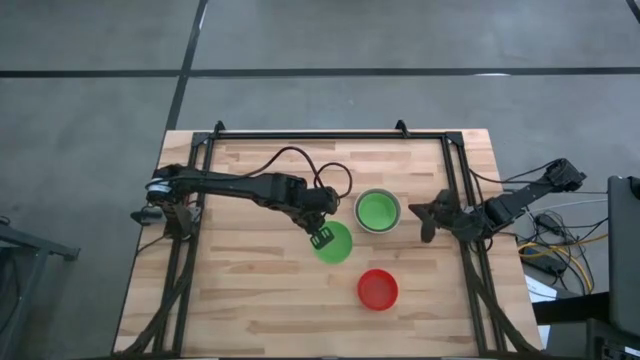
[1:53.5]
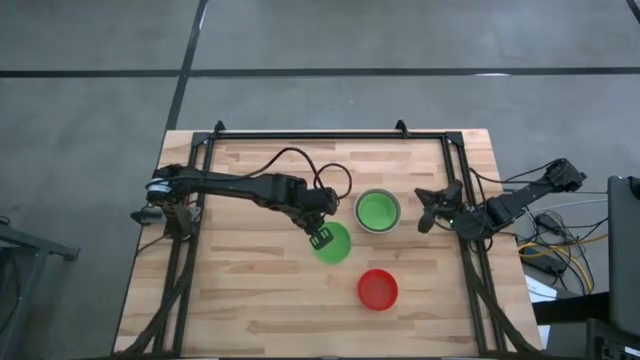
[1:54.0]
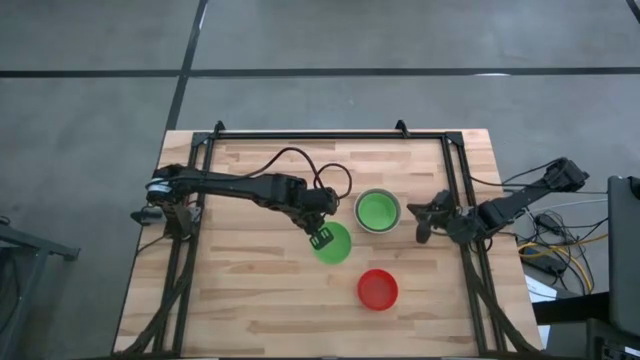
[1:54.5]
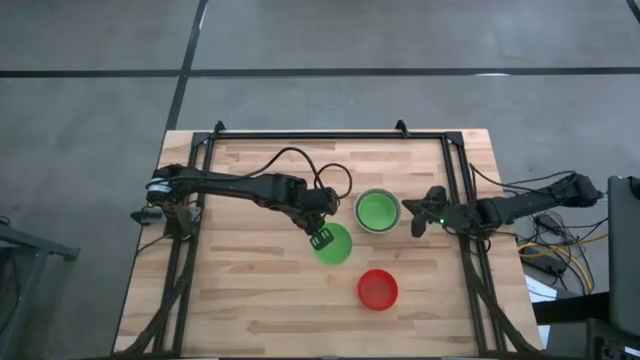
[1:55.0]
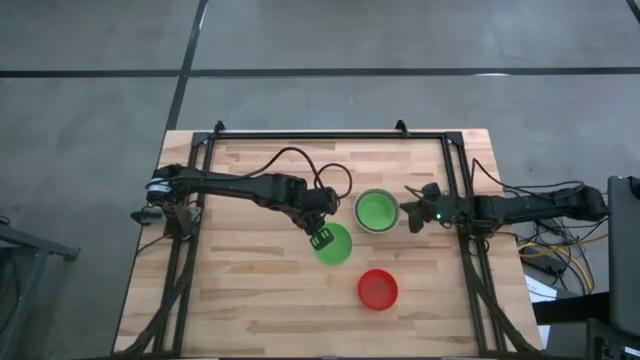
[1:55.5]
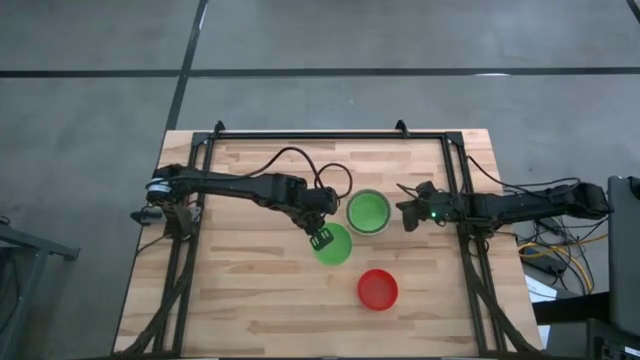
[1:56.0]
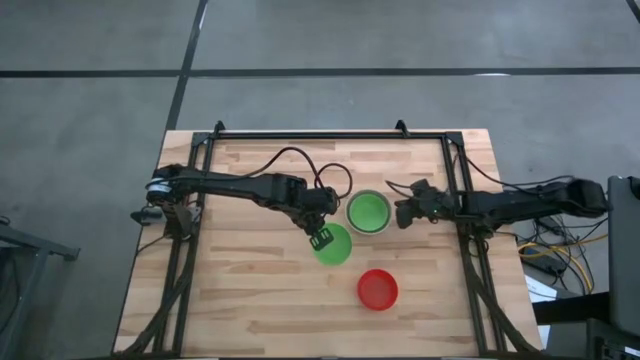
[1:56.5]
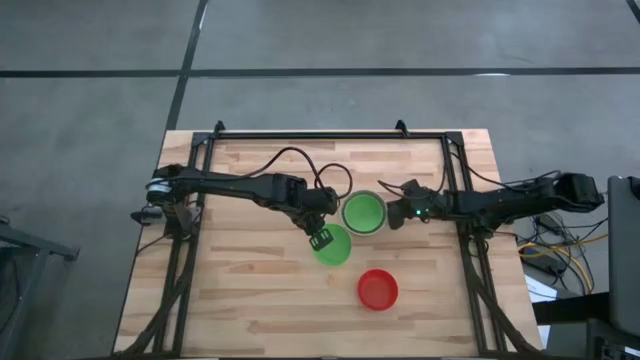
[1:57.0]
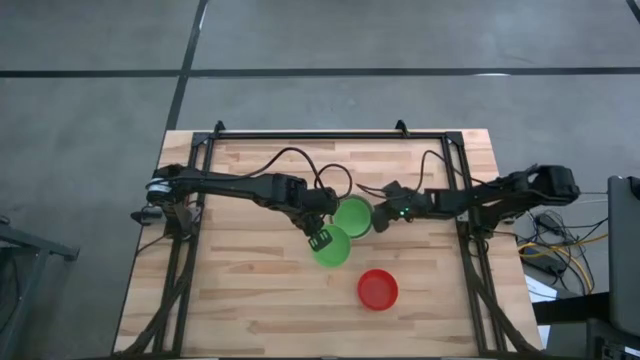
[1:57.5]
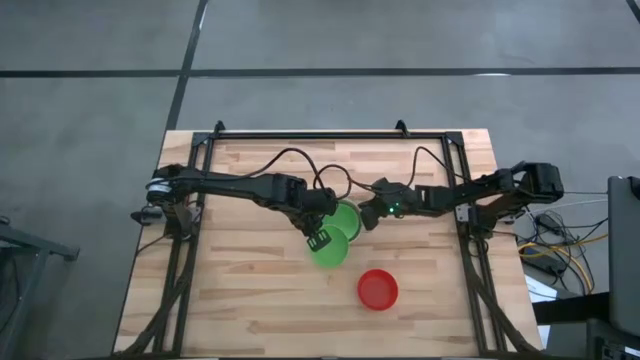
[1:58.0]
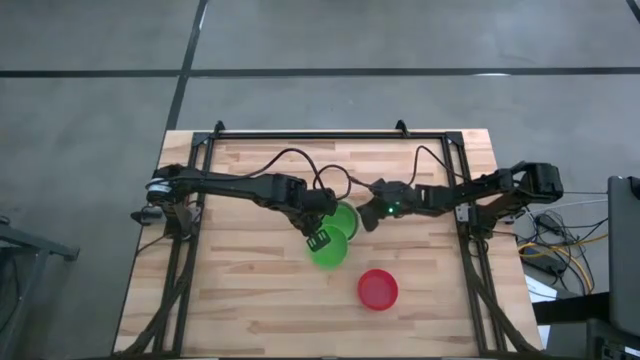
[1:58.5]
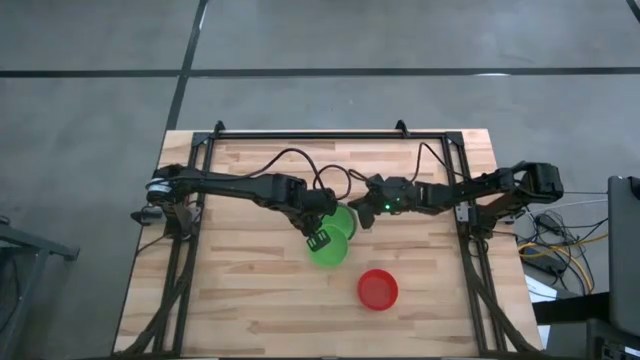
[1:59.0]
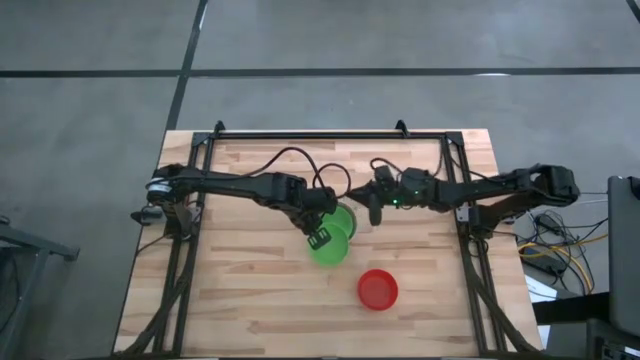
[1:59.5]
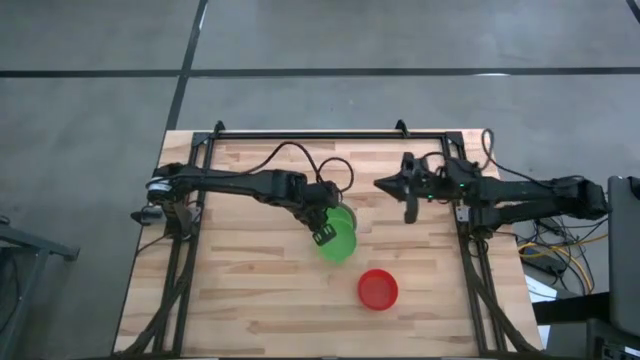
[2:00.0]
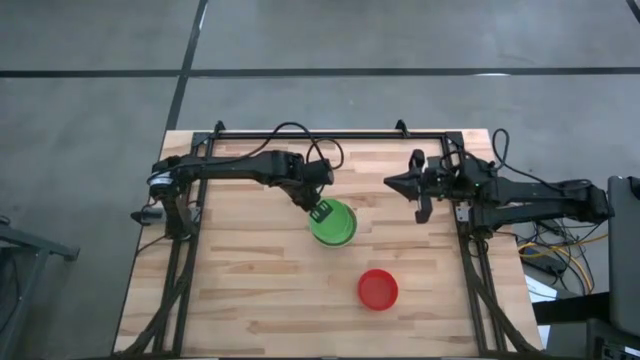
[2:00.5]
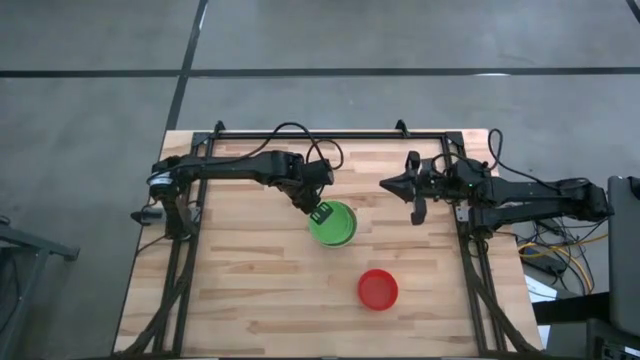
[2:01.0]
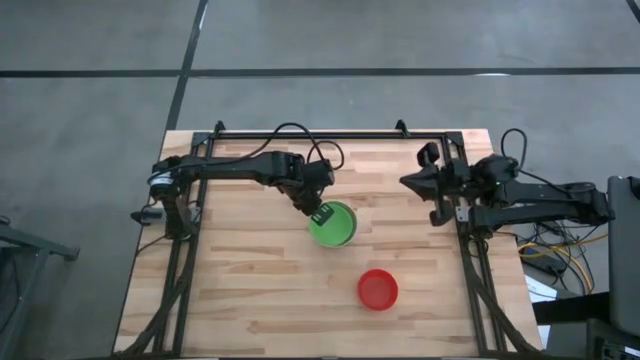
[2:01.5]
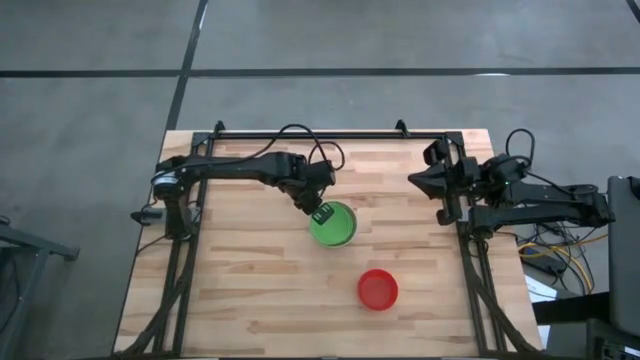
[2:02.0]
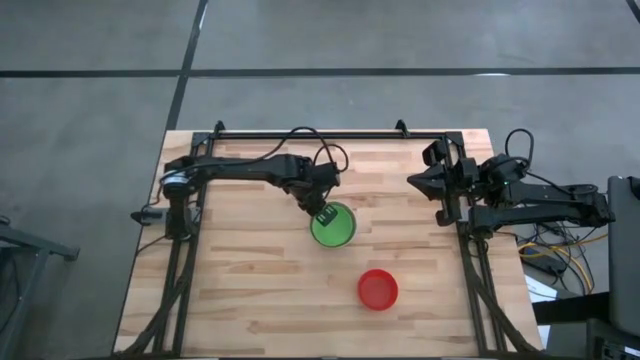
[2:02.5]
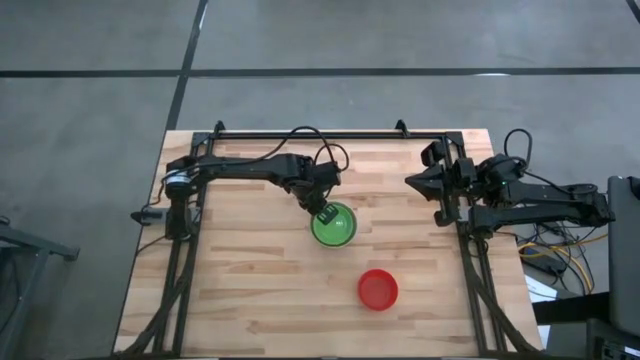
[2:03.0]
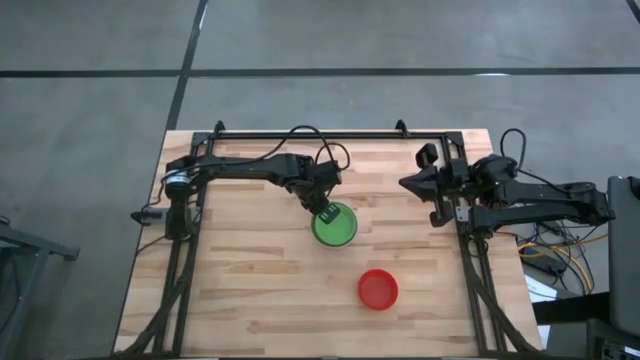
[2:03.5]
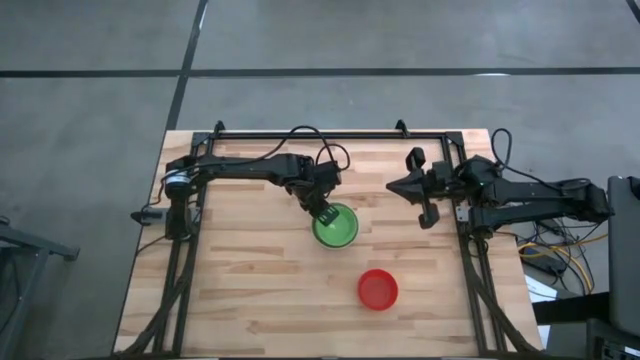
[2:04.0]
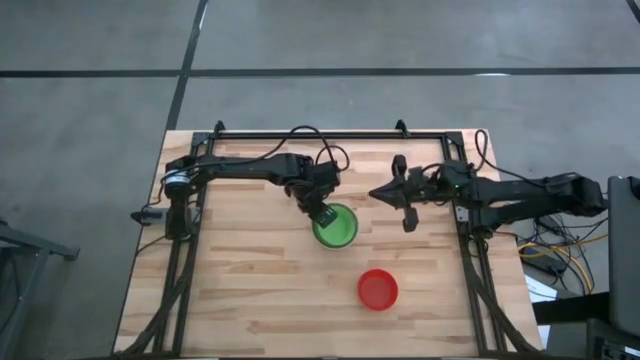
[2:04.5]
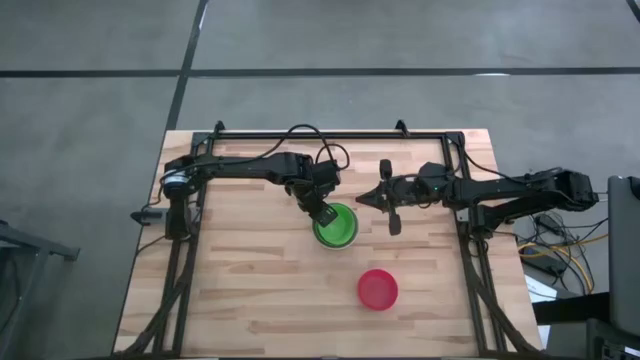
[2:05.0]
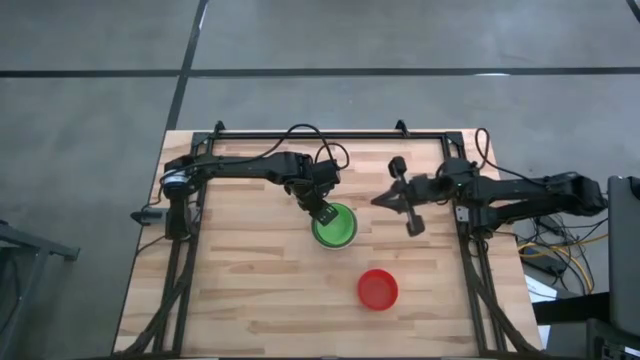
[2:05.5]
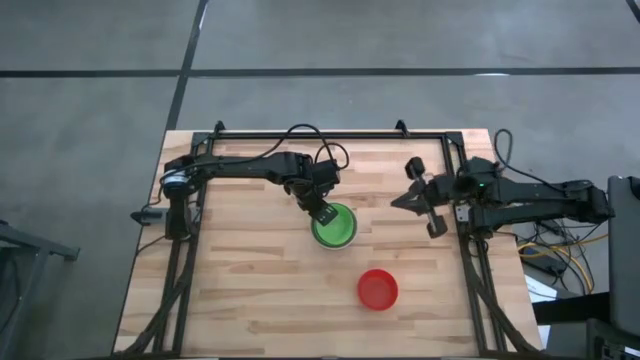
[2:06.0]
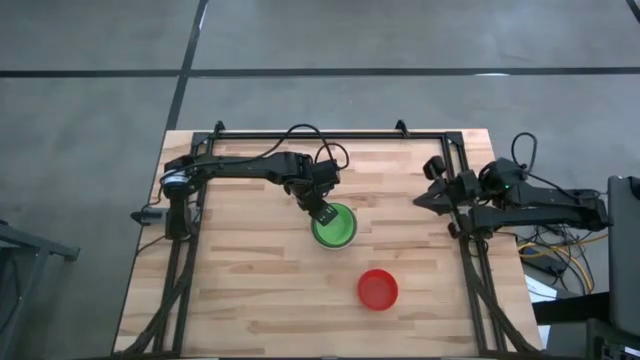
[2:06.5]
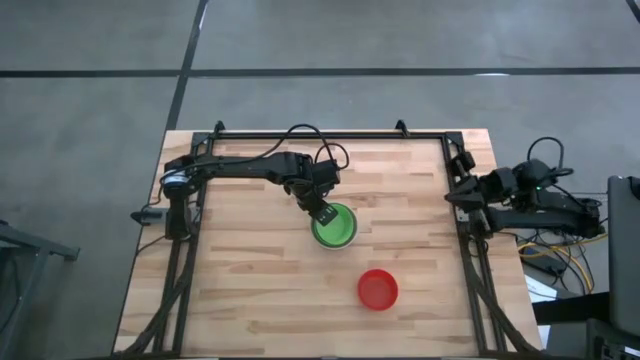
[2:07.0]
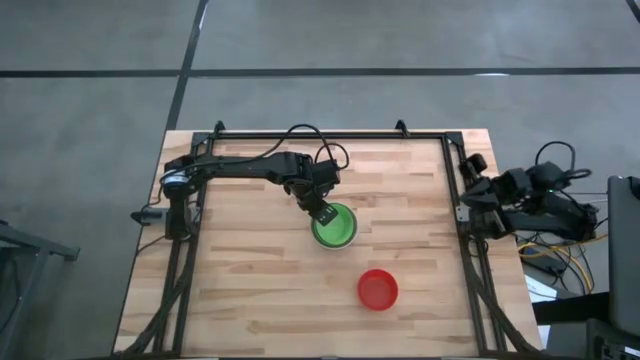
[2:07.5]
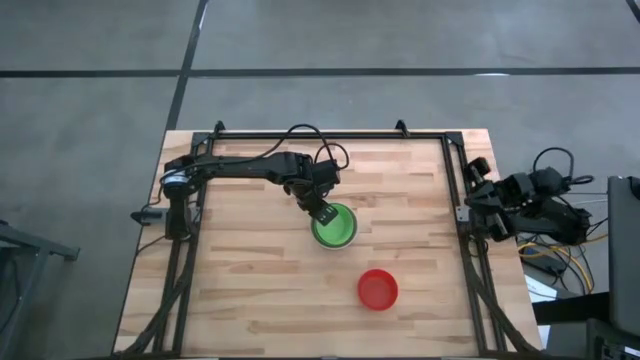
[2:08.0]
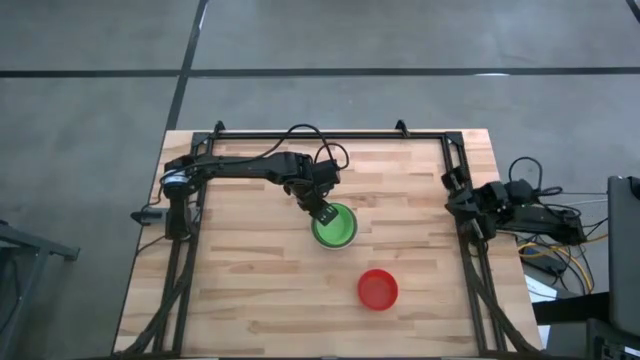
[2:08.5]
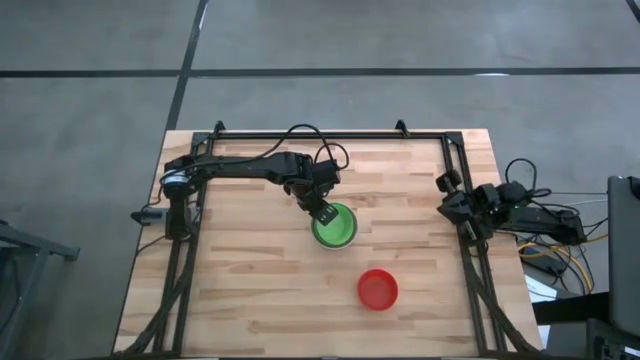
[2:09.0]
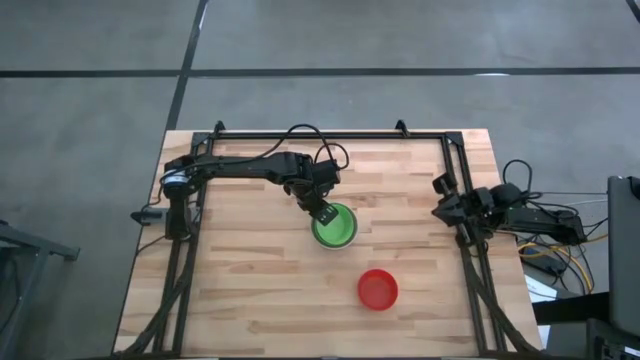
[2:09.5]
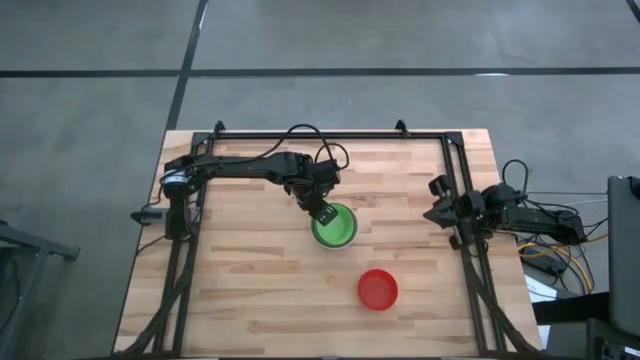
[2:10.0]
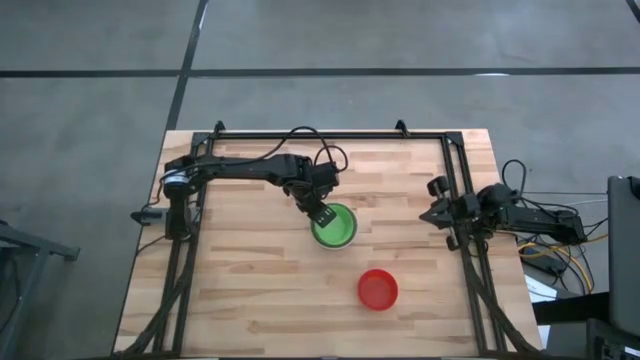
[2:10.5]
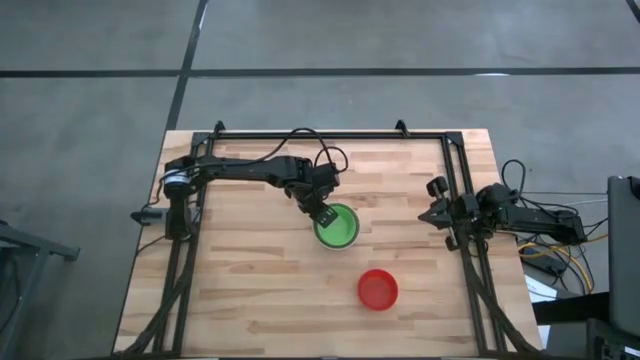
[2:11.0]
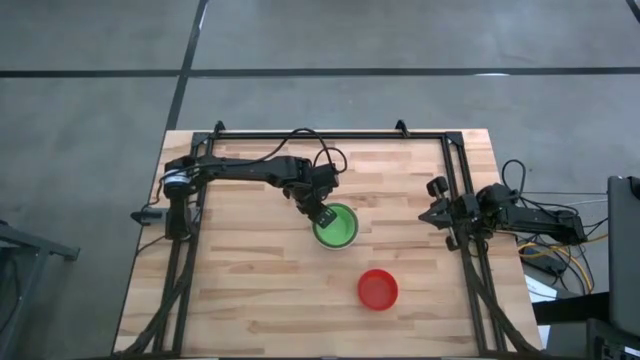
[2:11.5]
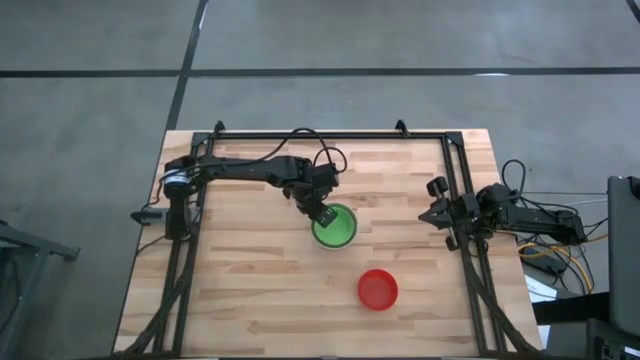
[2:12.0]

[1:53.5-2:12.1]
Stack the green bowl on the green bowl
